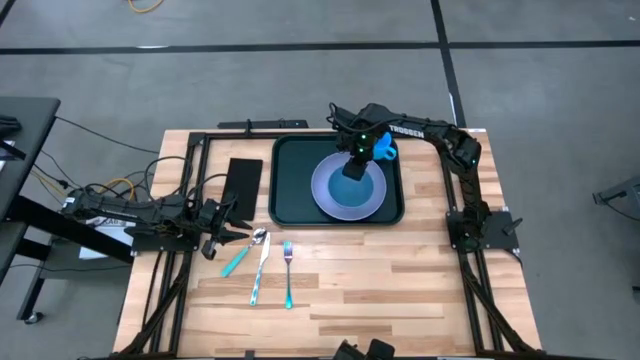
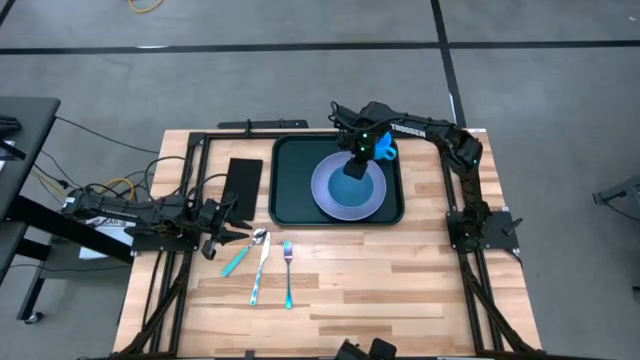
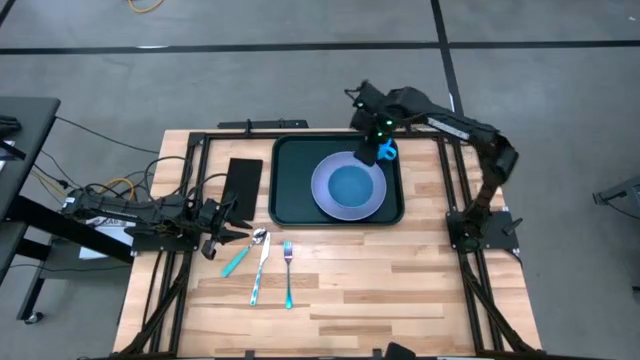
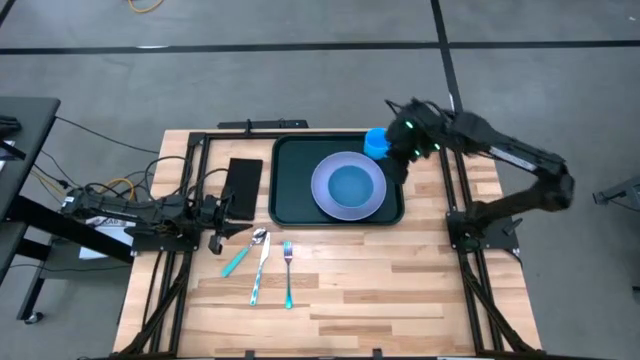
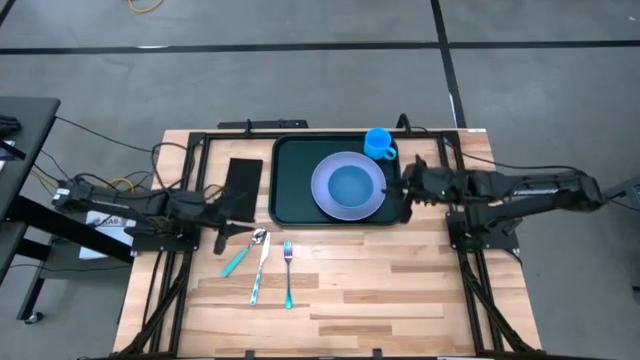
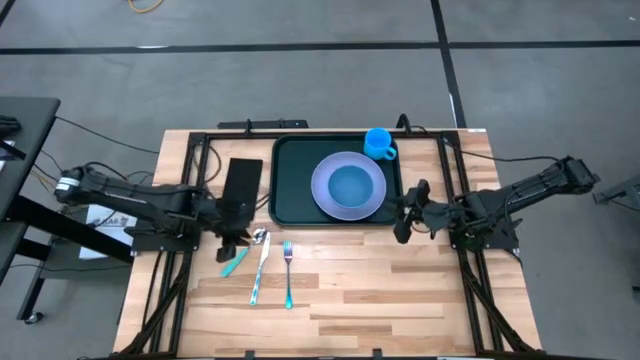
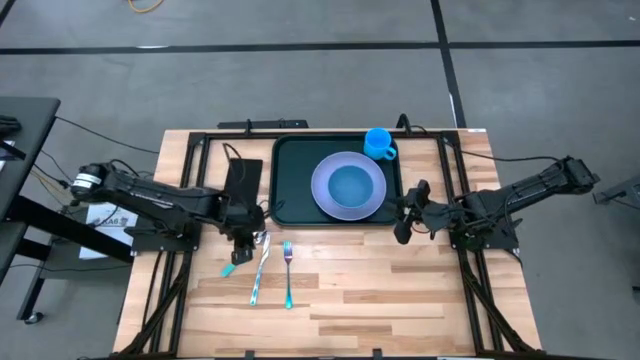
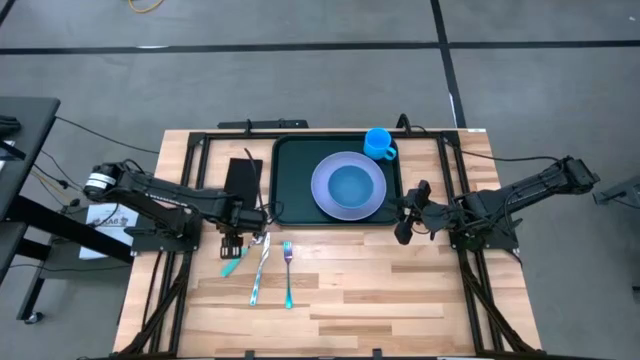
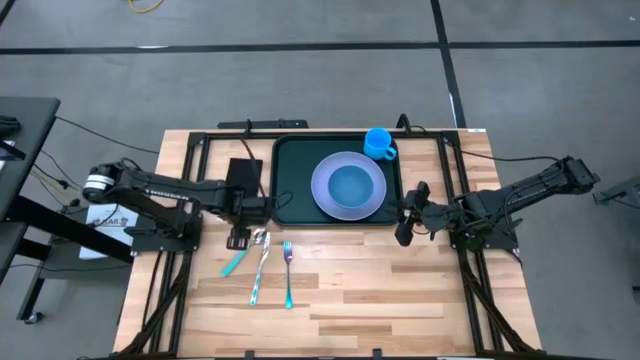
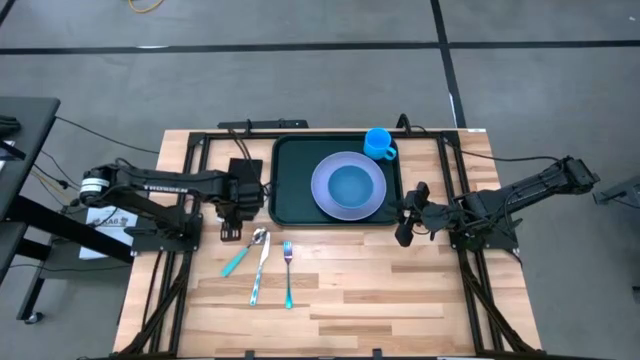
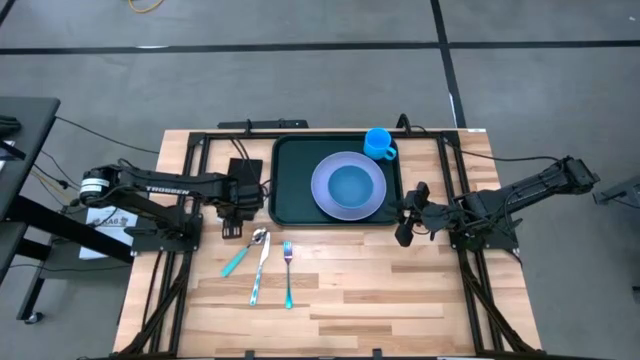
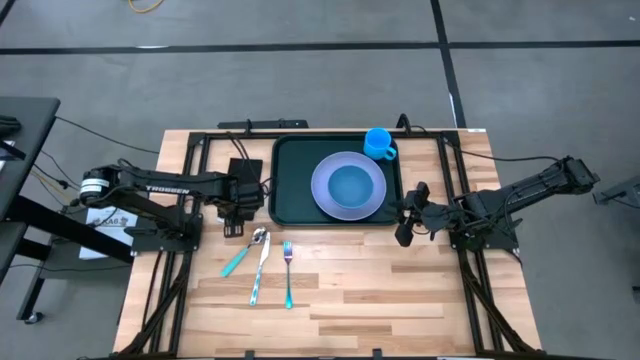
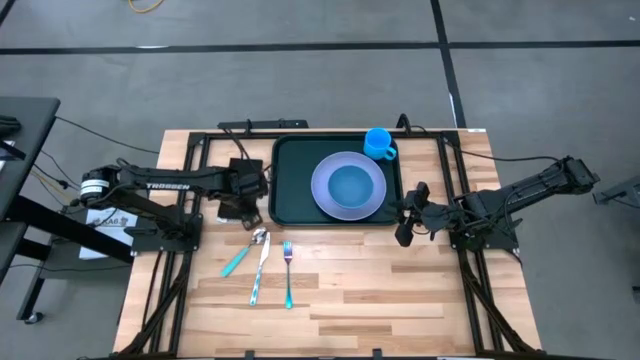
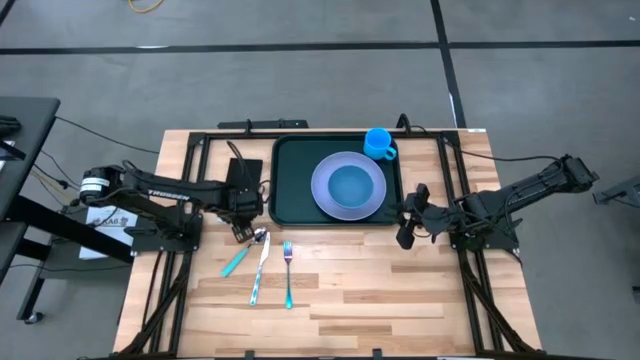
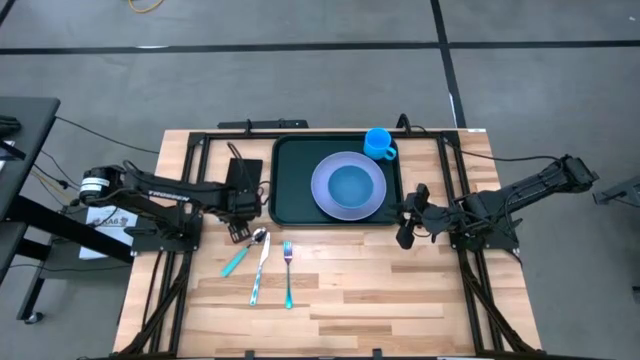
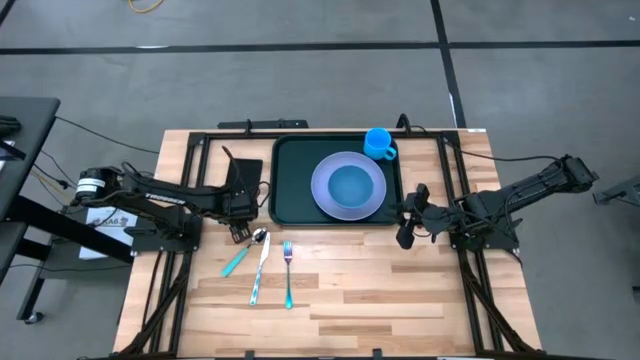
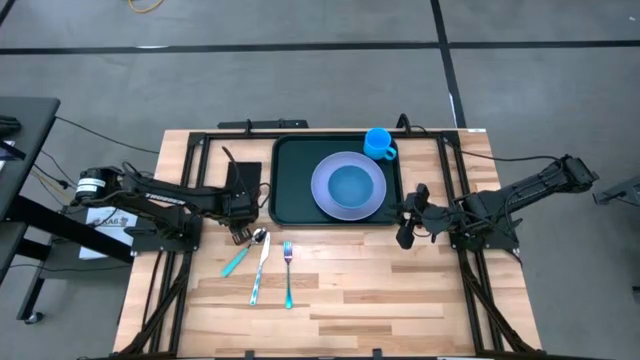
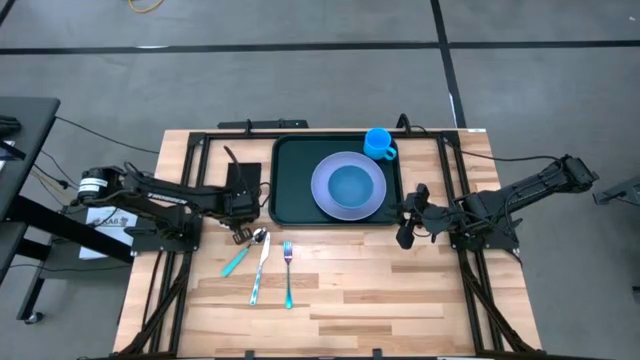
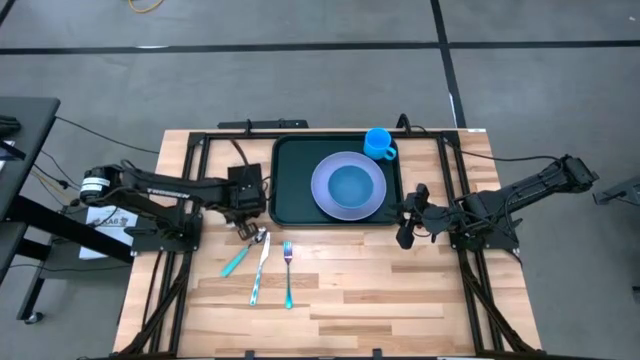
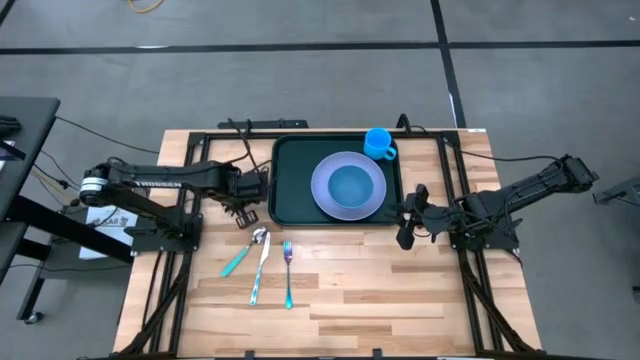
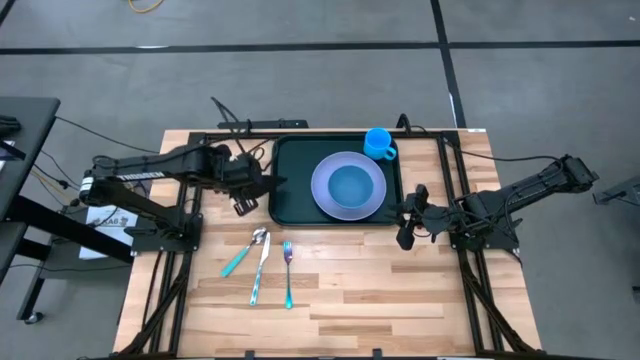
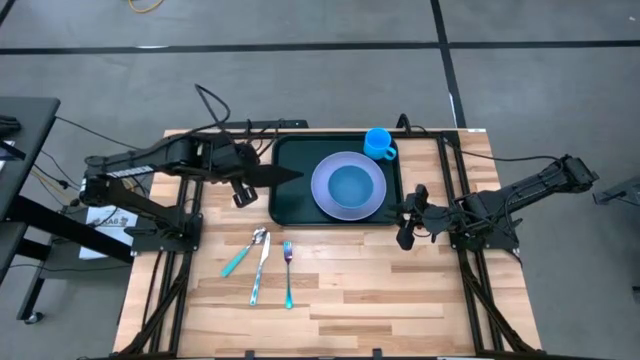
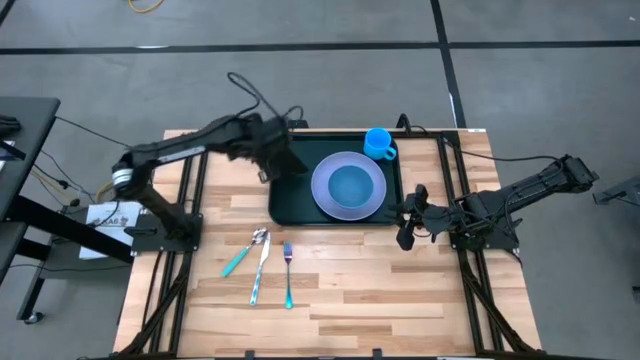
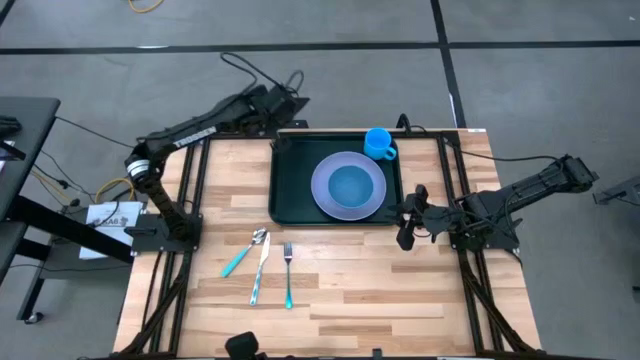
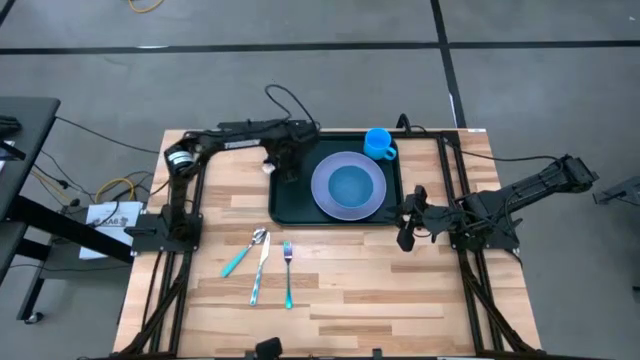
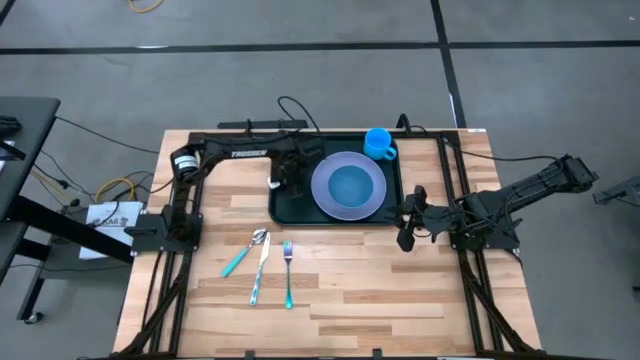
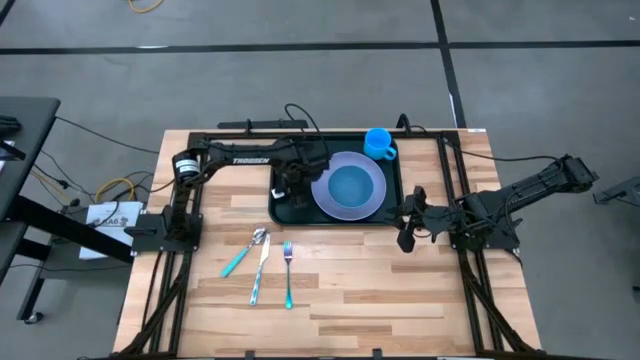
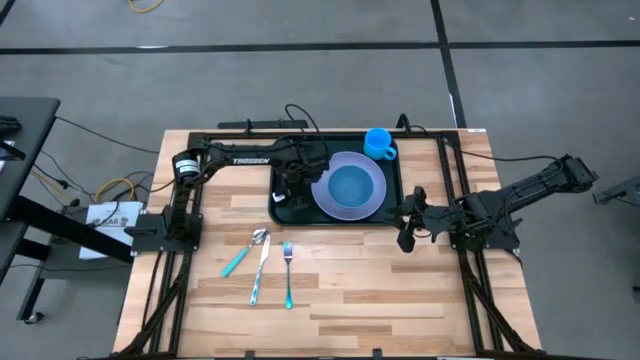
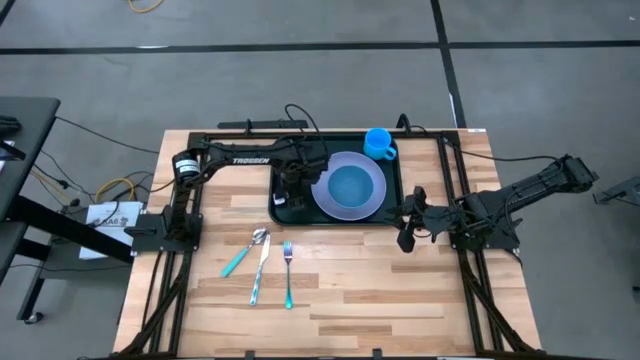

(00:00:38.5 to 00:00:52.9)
Task: Set up tray
Put the black napkin on the black serving tray to the left side of the purple plate

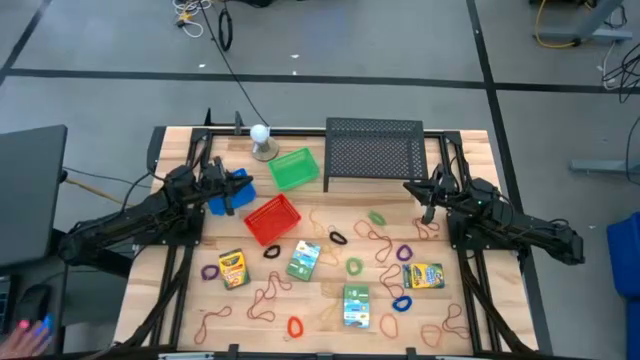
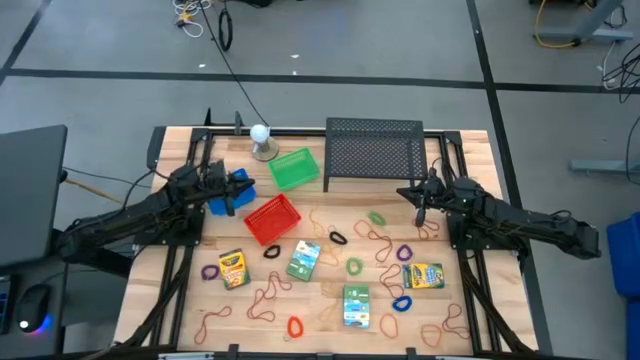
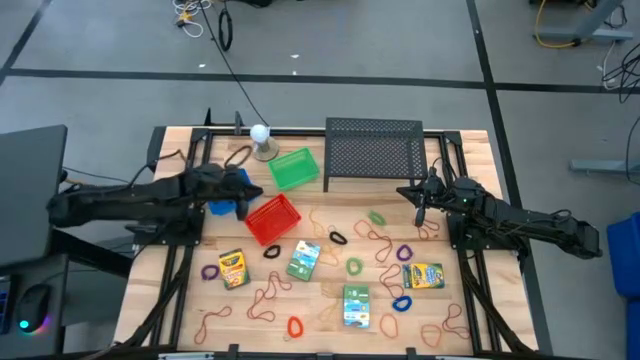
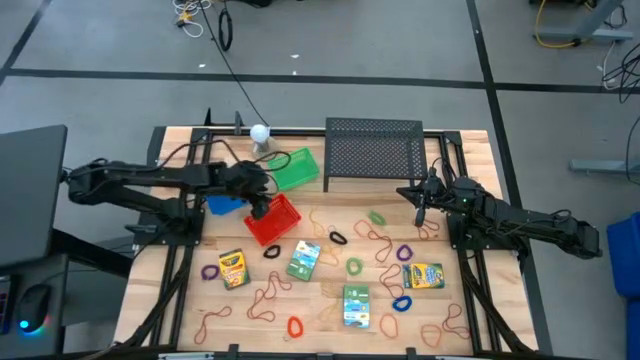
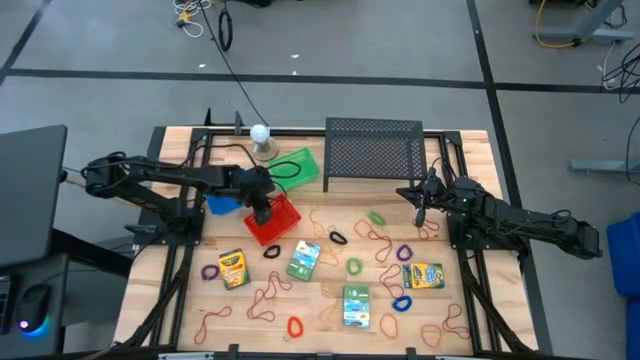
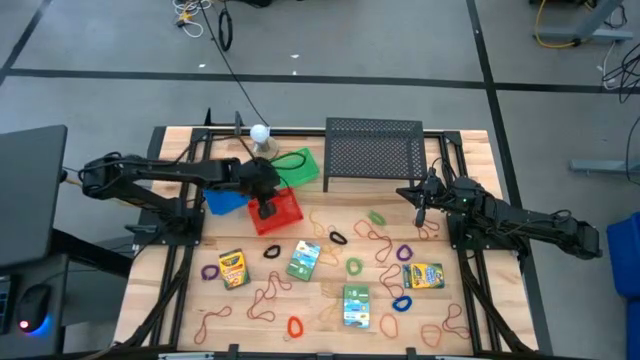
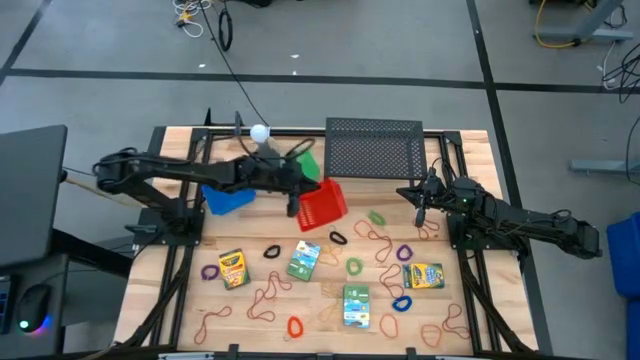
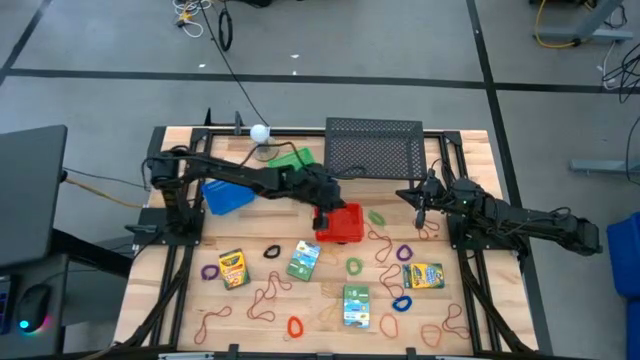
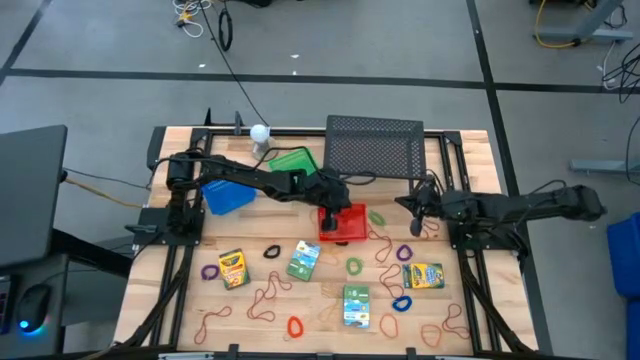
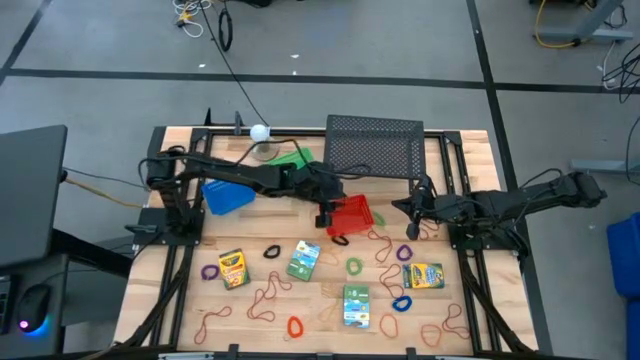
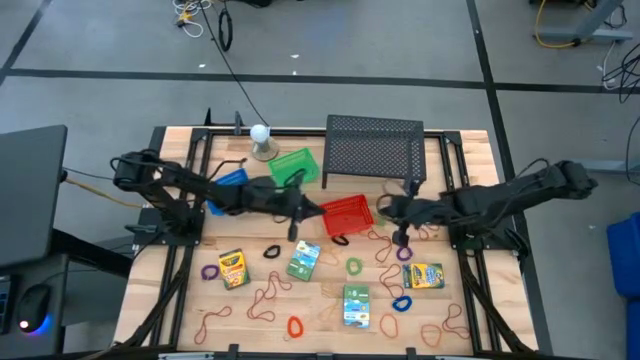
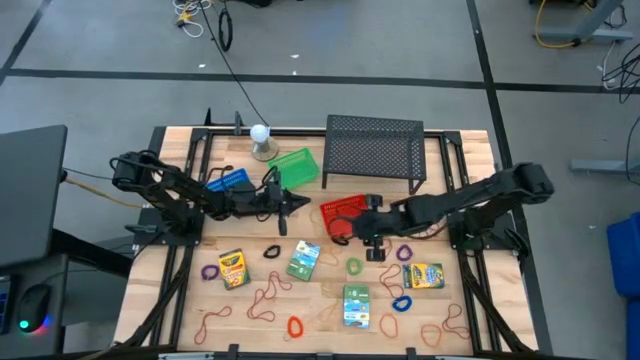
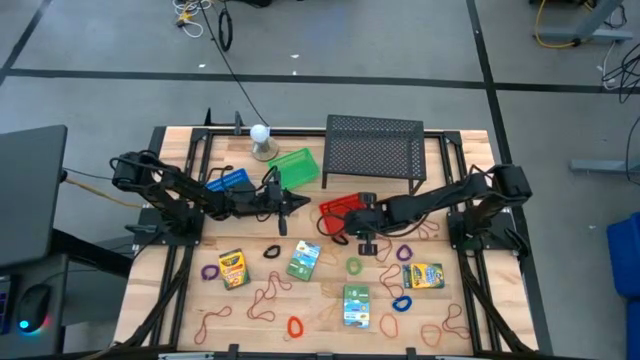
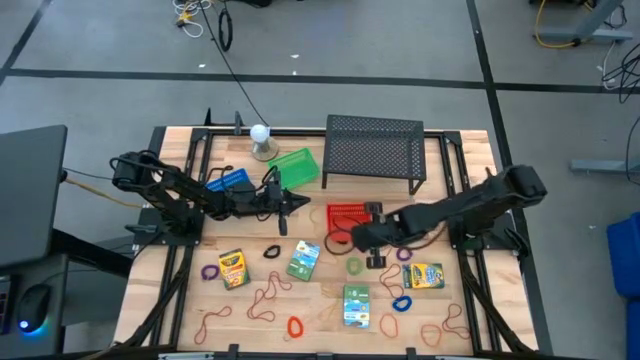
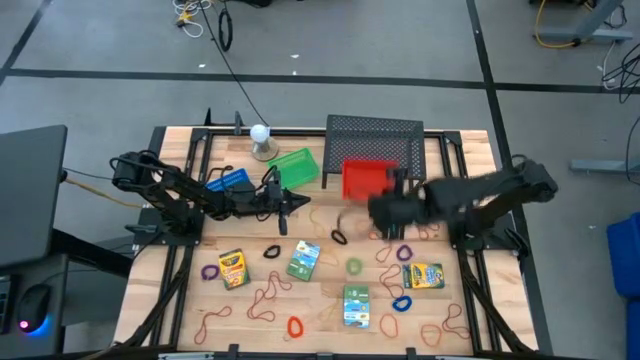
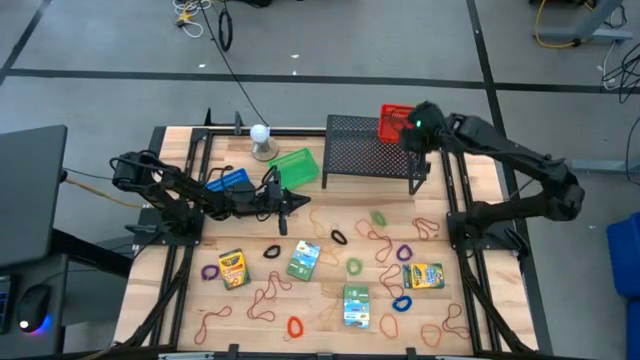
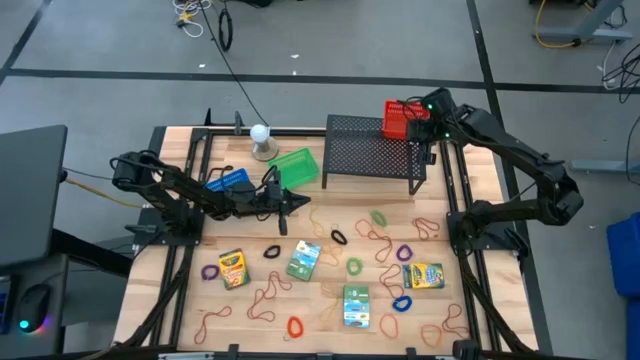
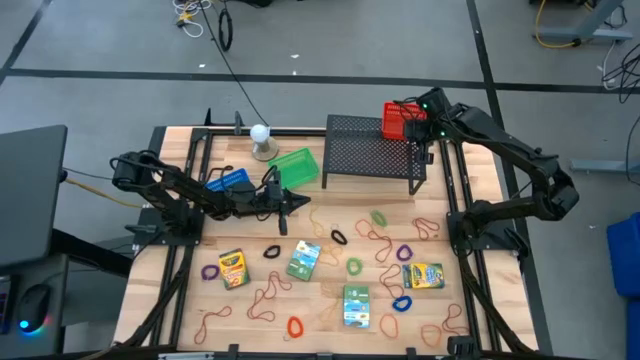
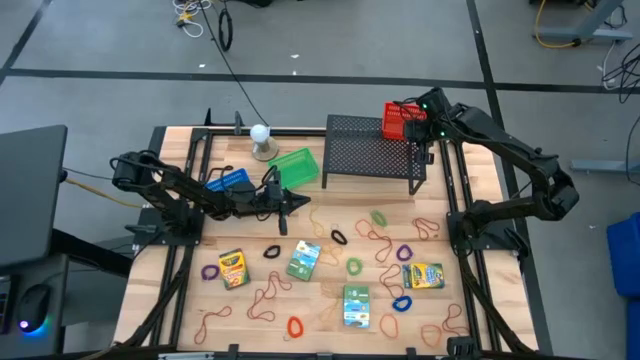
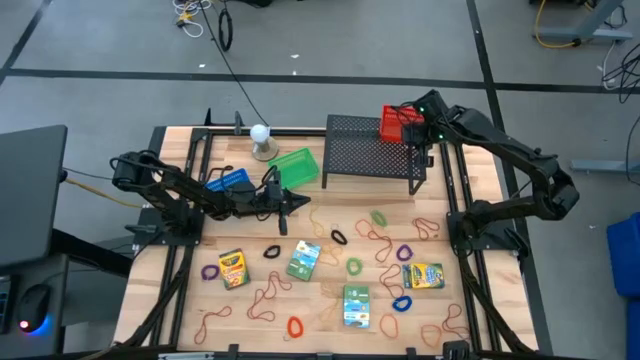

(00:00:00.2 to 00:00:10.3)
Task: Pick & Place Office Desk Supplies
Put the red bin on the shelf
